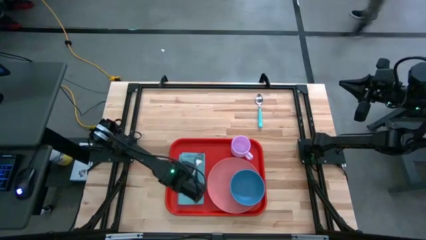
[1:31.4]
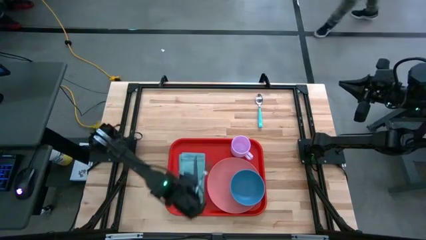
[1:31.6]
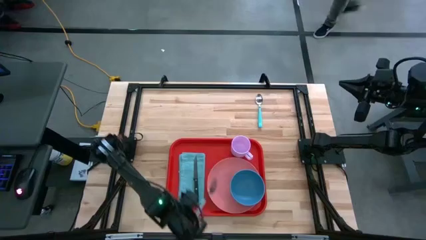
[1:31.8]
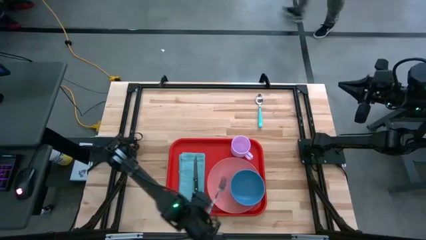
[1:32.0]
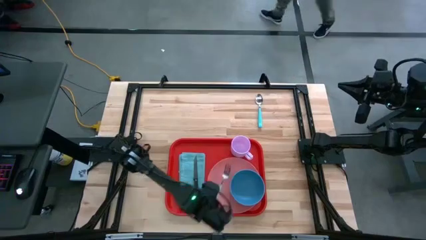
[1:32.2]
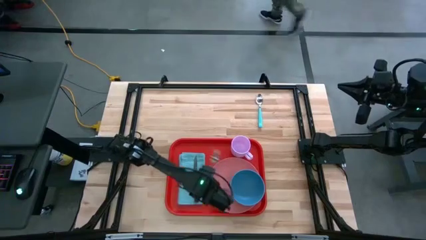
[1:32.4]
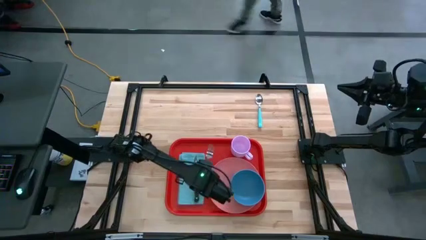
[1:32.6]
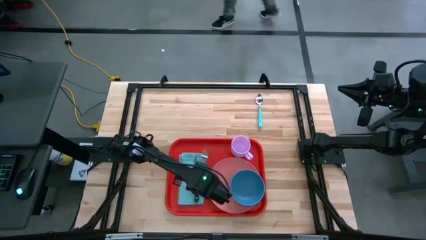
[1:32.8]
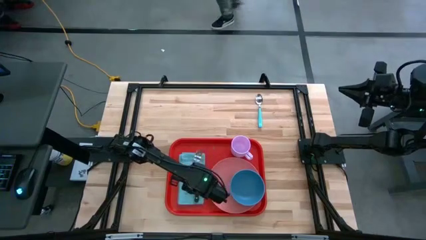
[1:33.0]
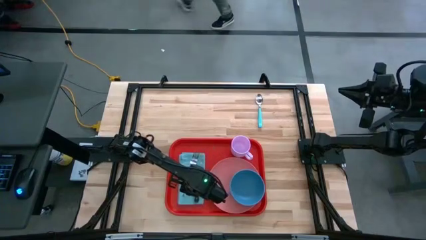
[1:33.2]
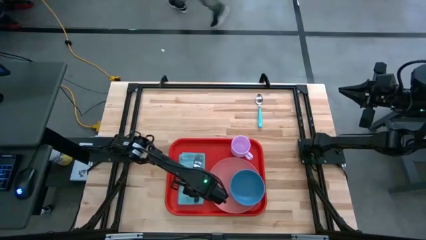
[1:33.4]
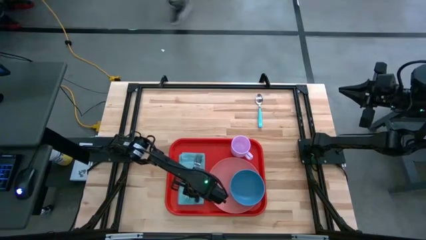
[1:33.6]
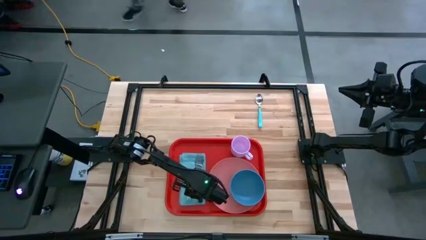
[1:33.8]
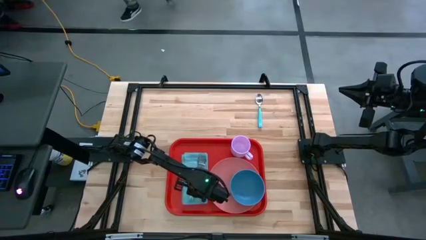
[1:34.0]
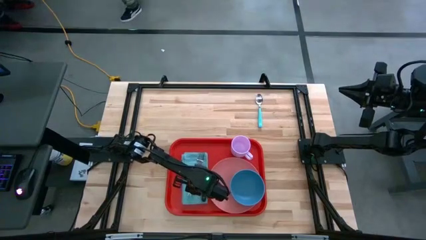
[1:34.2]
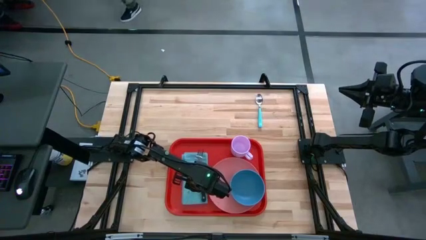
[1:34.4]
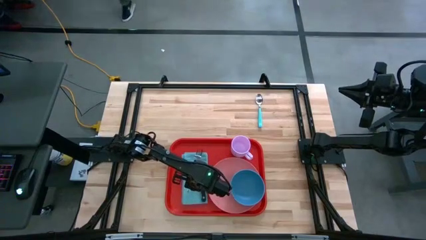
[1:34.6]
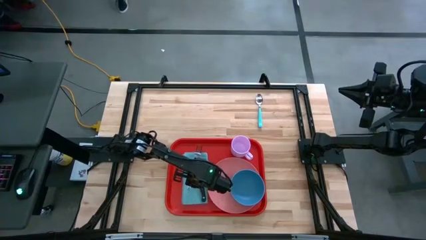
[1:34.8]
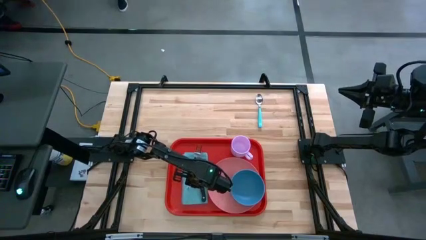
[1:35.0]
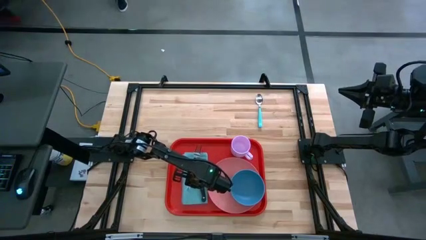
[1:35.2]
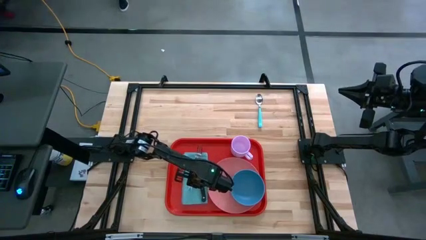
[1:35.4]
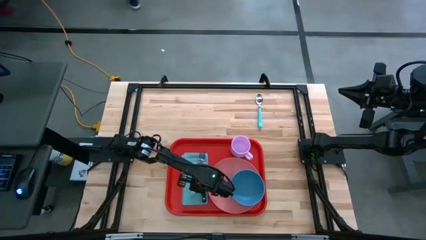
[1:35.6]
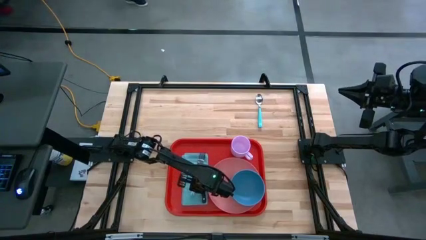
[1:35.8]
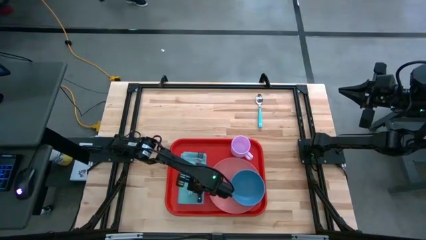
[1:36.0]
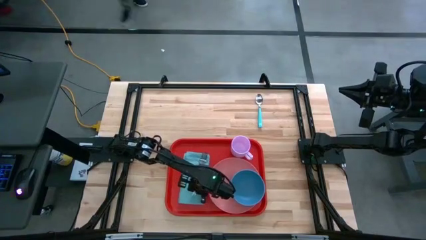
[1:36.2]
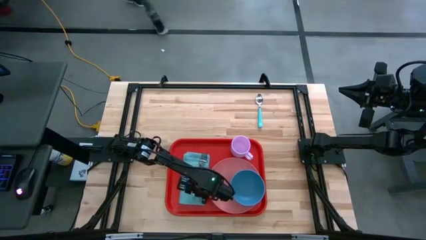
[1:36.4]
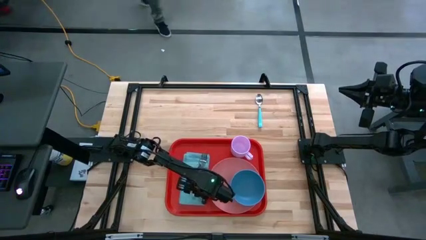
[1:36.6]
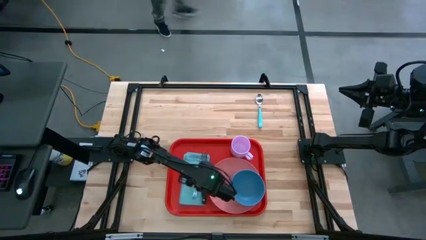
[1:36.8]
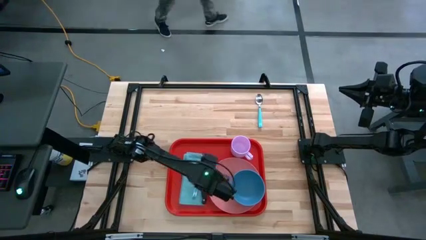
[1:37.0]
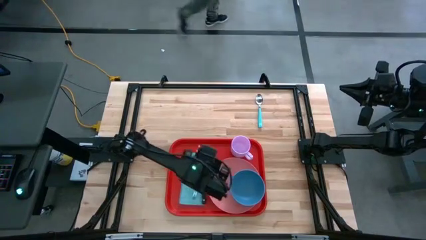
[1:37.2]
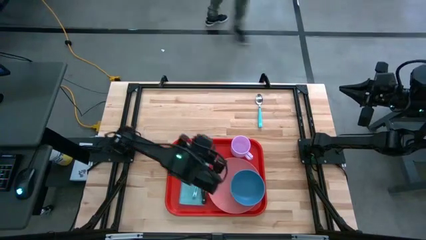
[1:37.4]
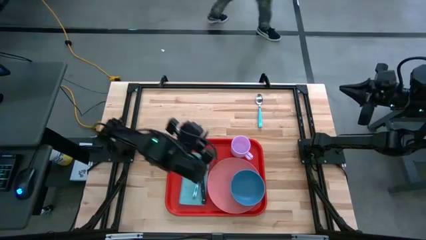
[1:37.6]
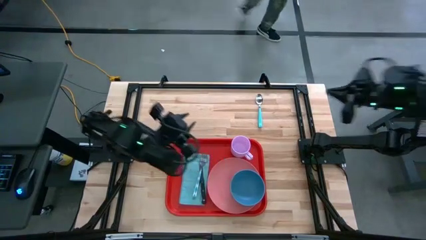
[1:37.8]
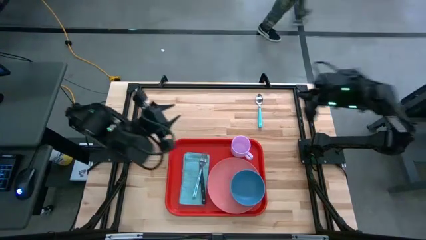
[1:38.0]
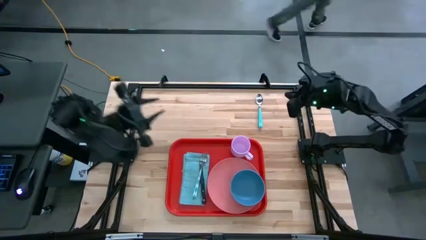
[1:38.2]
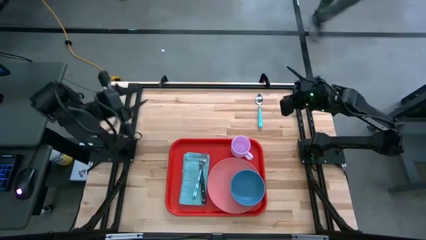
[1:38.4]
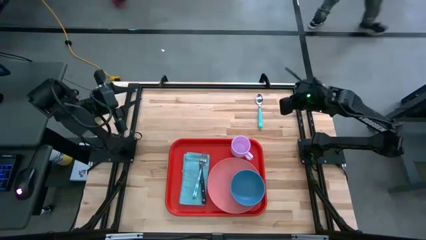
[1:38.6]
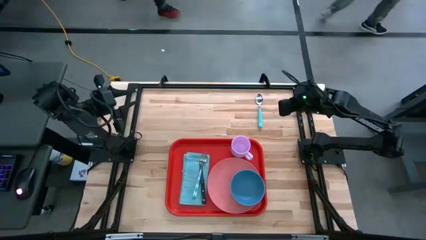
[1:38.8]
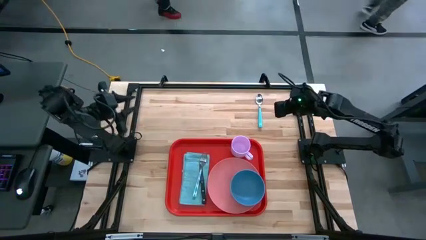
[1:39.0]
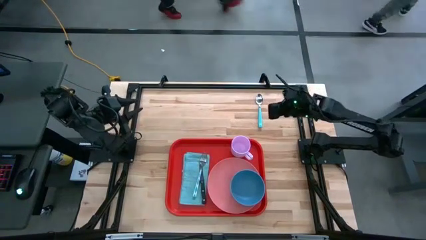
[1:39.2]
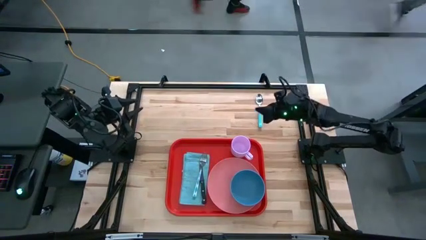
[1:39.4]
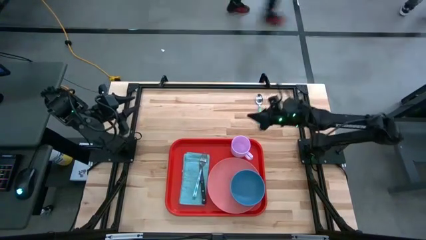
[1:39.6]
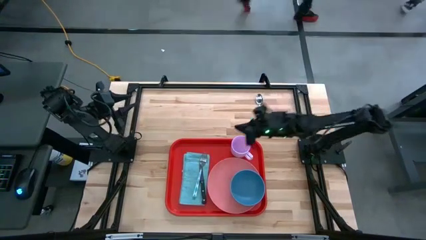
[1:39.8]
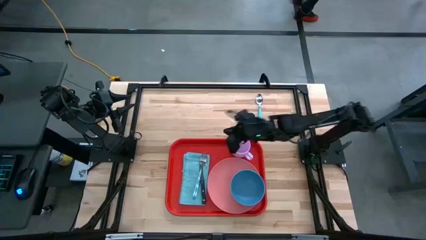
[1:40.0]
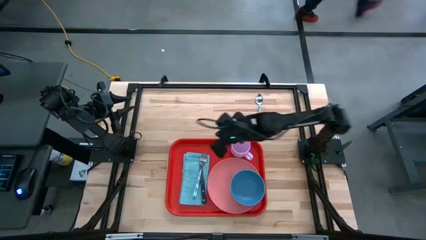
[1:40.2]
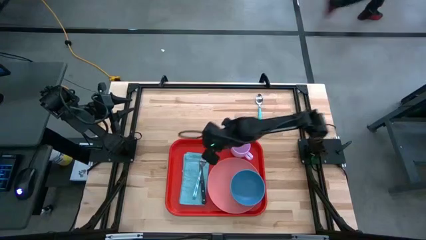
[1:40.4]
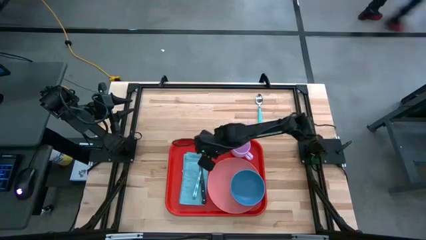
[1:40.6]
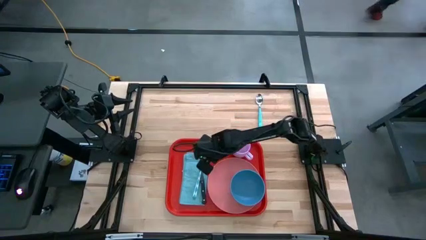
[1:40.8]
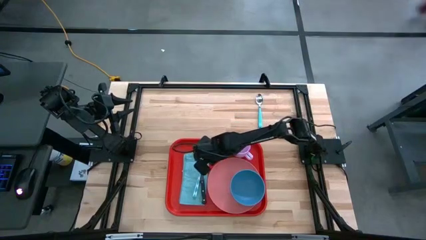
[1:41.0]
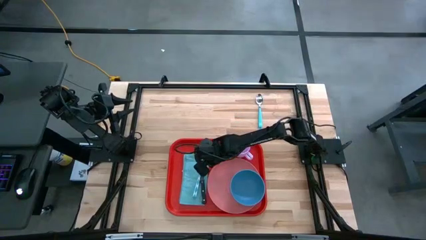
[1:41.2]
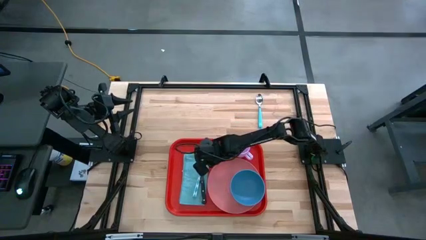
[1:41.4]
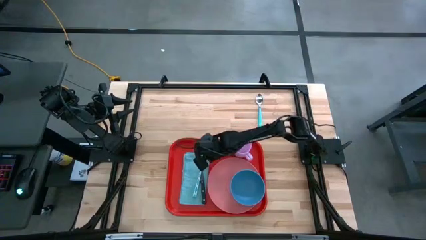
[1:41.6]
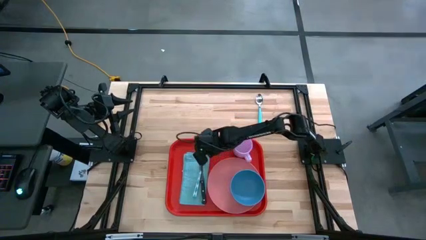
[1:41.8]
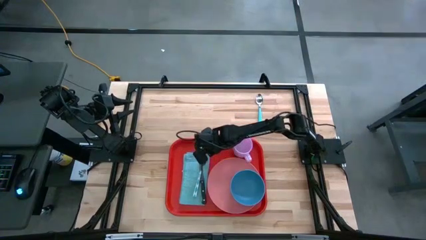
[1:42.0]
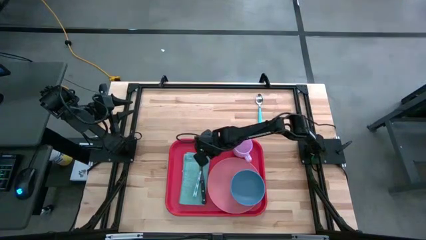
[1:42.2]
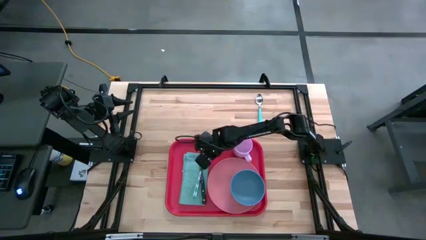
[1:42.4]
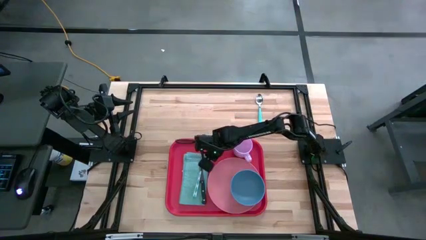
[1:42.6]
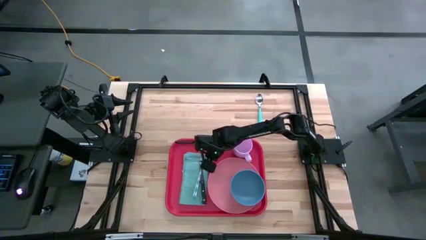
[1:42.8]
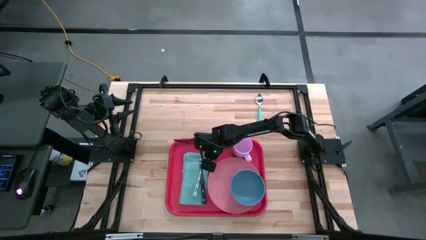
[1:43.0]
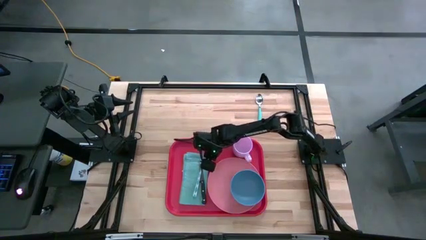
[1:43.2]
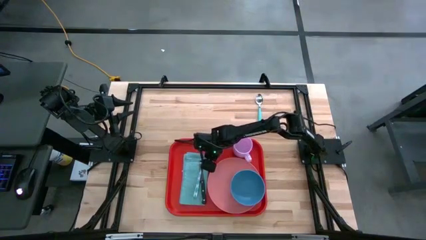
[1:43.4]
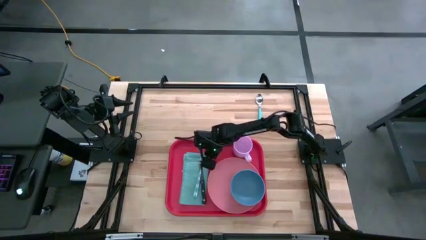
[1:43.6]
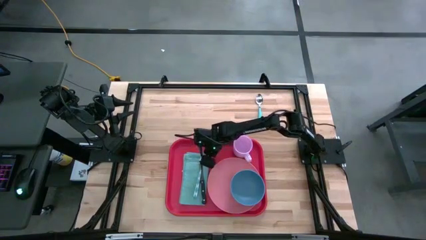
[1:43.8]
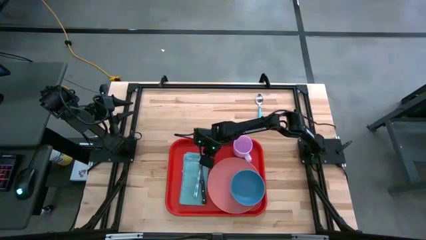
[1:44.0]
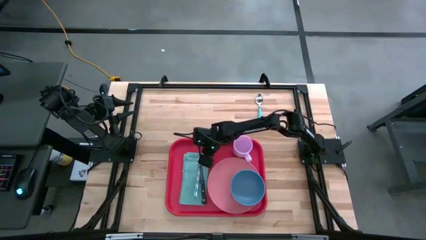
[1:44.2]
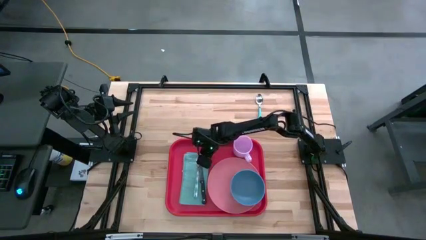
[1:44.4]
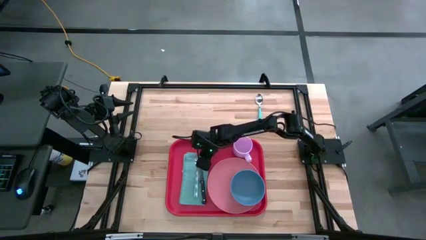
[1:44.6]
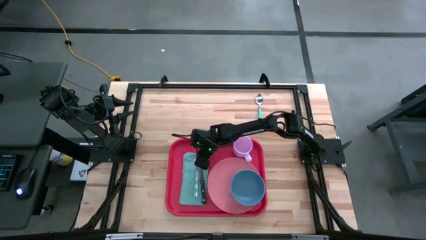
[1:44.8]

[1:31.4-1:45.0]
Task: Set up tray
Put the blue fork on the blue napkin to the left side of the black knife on the red serving tray
